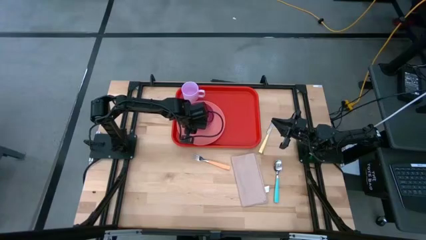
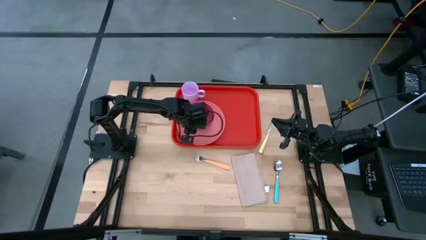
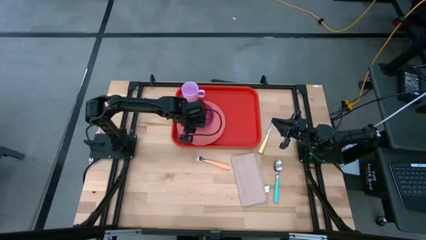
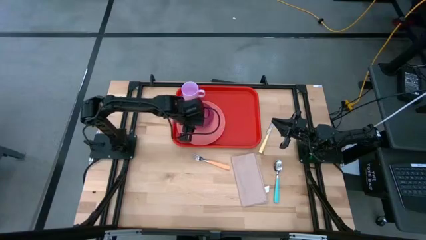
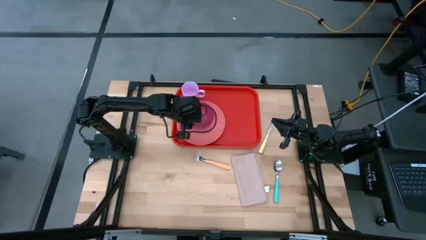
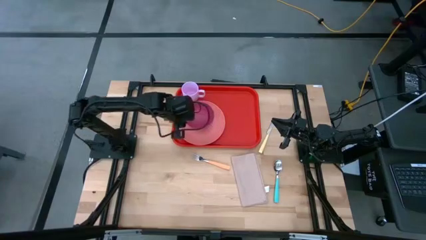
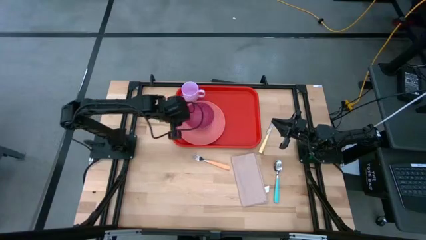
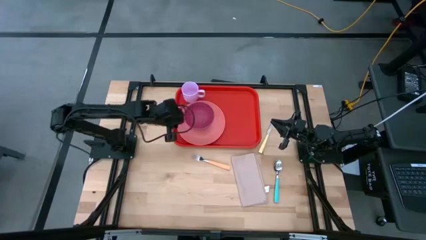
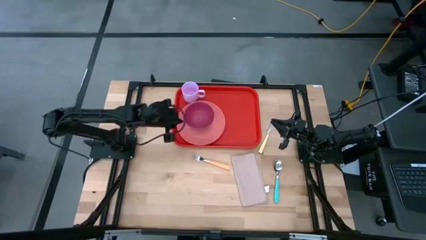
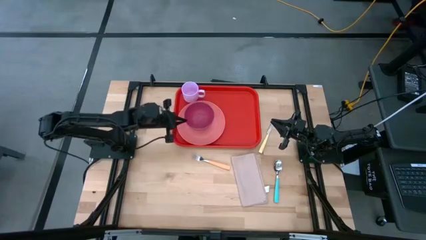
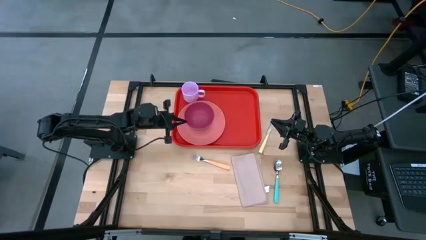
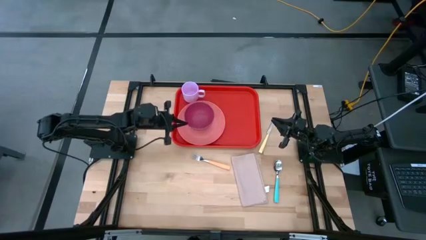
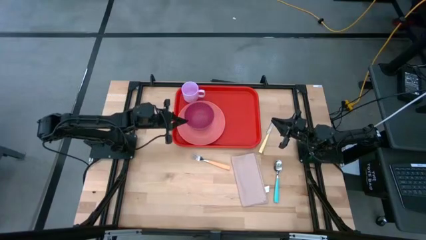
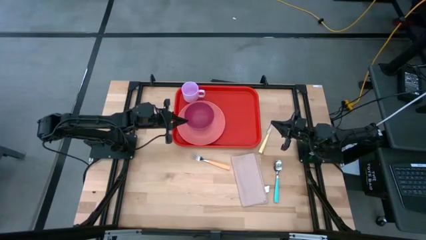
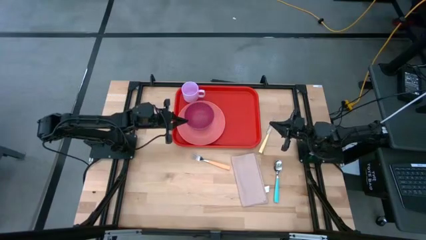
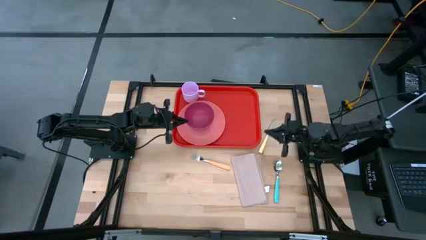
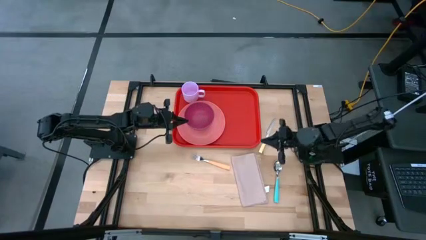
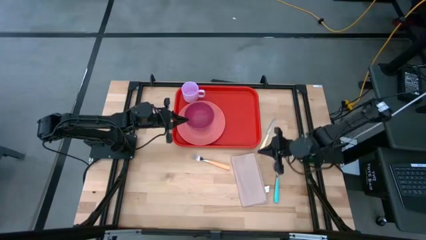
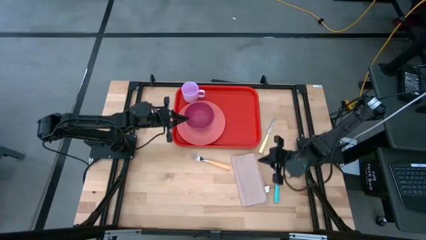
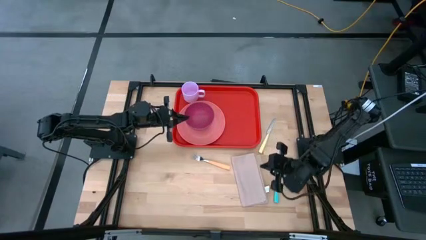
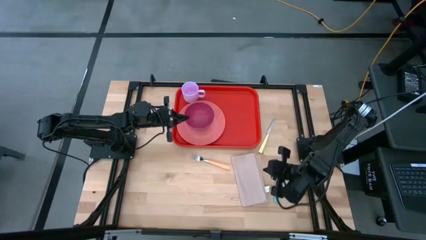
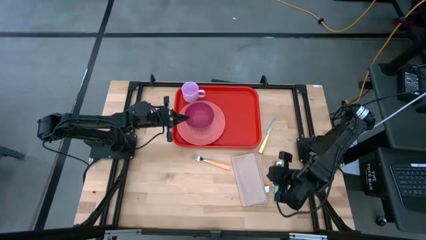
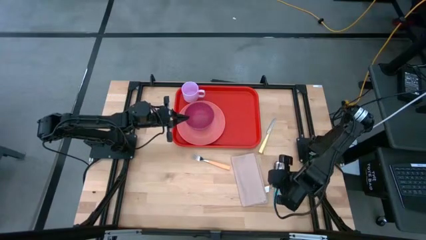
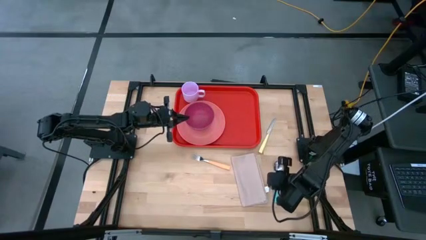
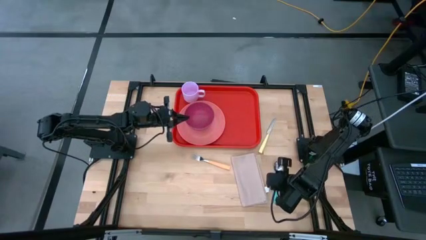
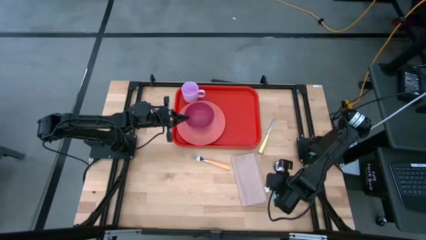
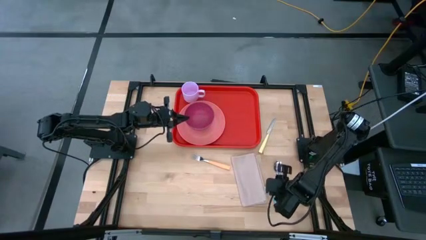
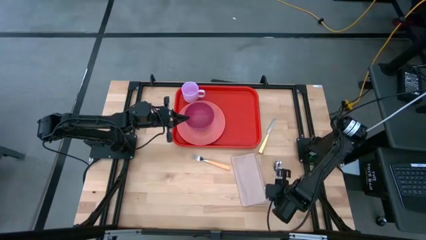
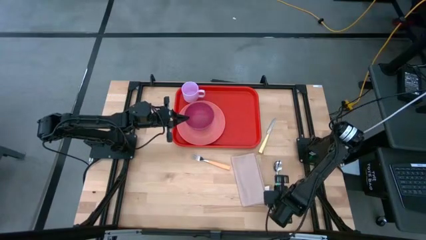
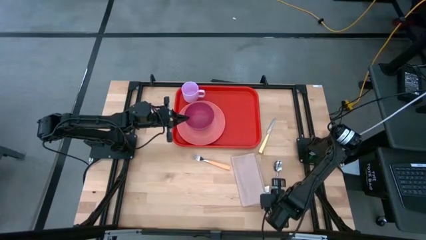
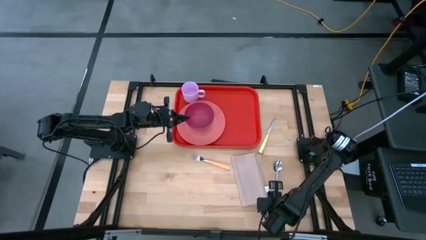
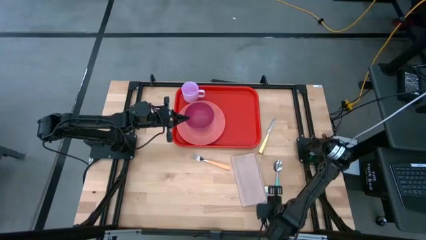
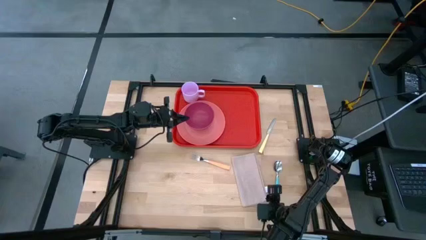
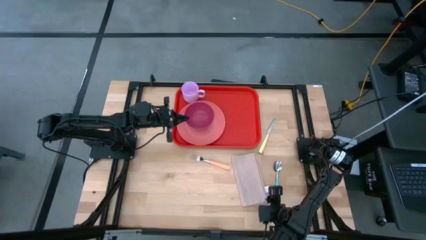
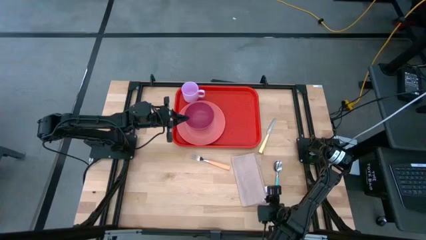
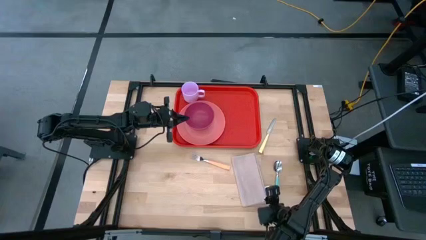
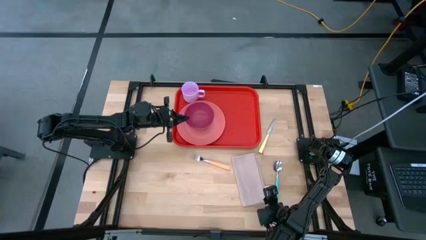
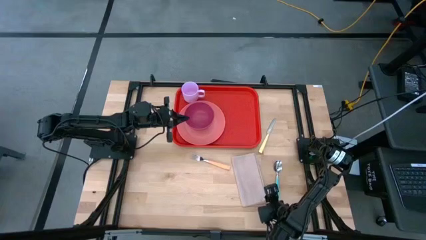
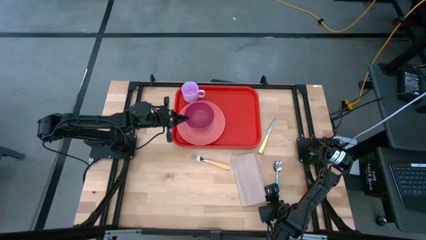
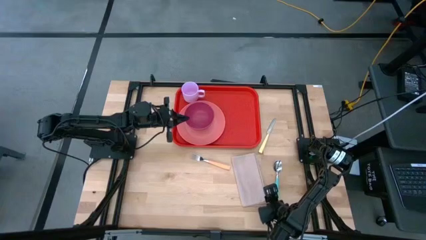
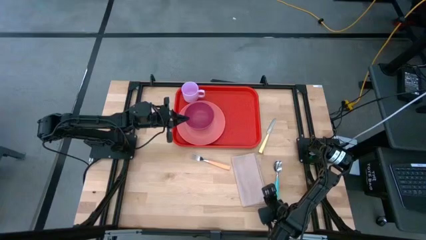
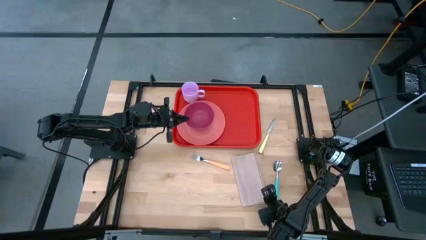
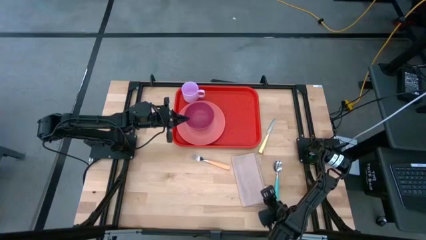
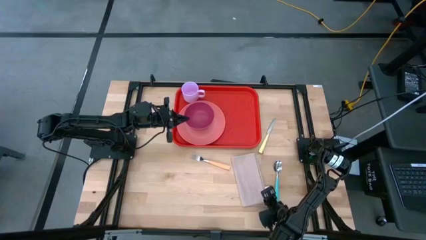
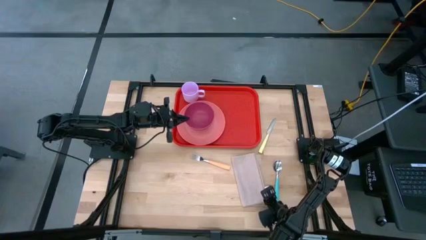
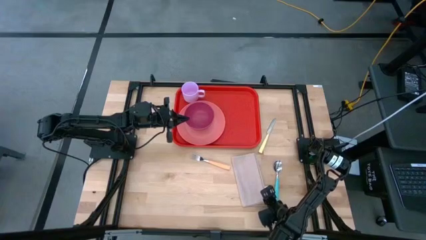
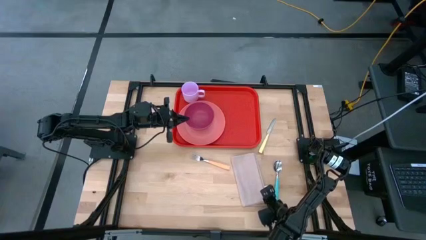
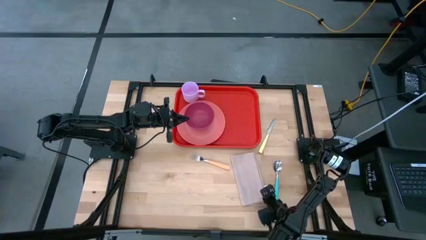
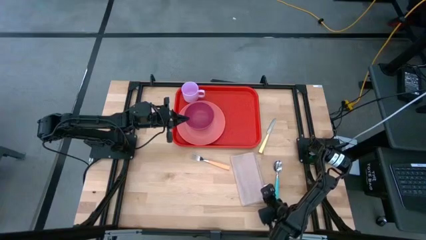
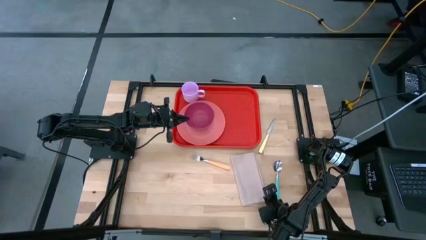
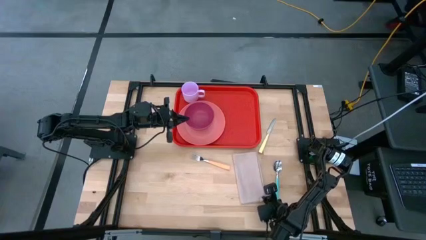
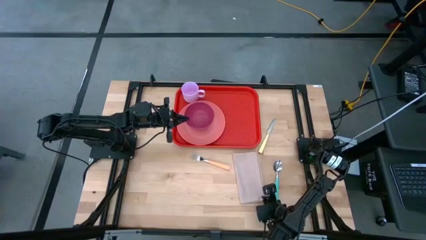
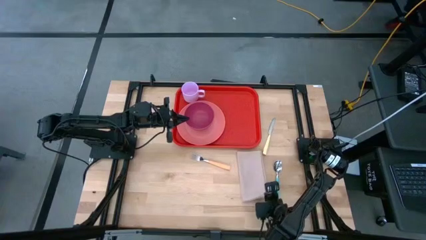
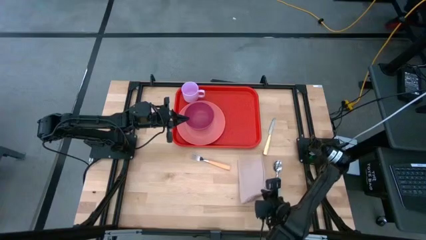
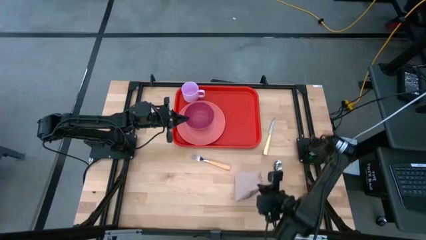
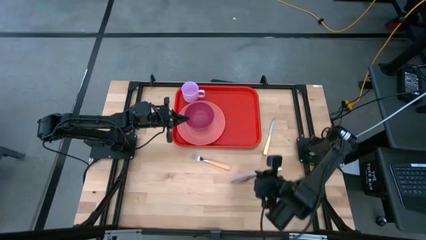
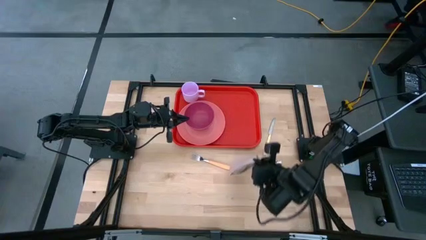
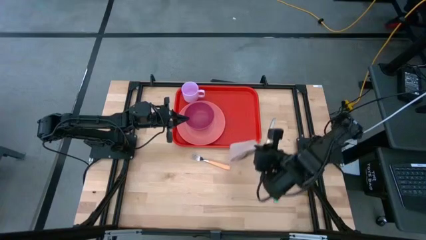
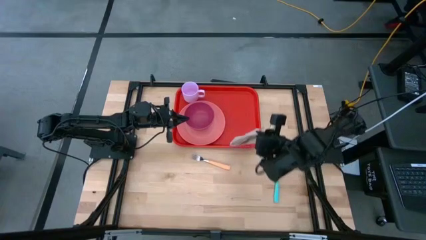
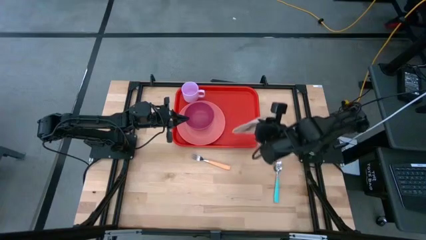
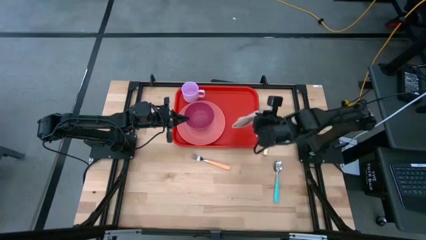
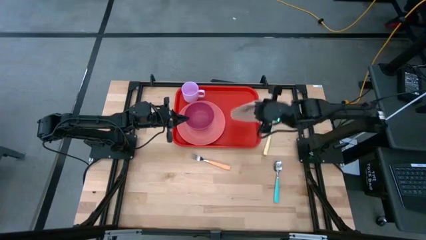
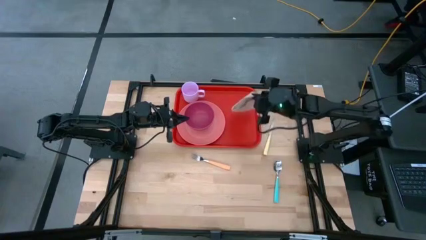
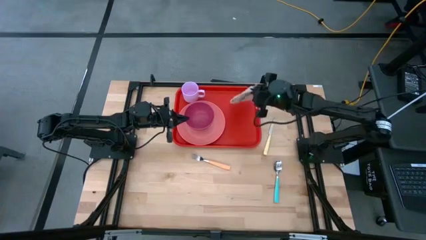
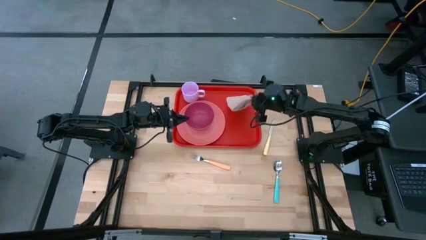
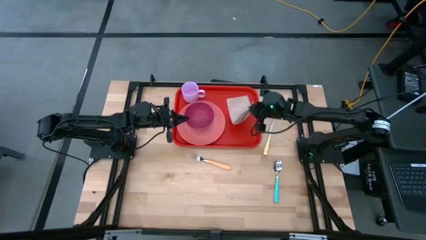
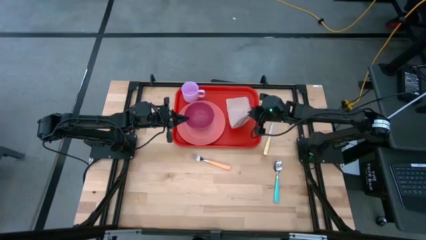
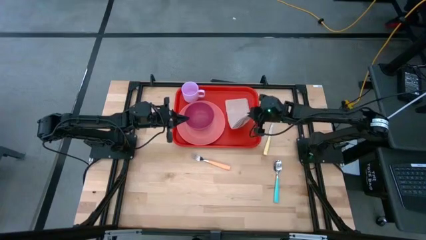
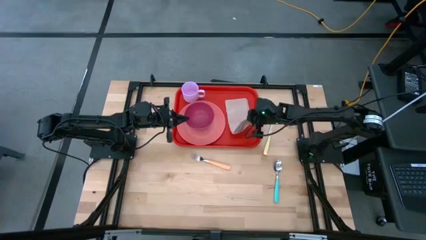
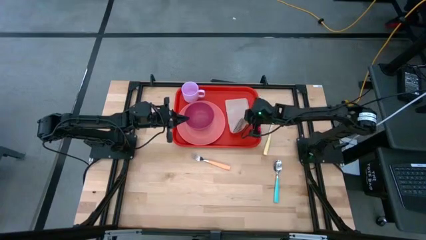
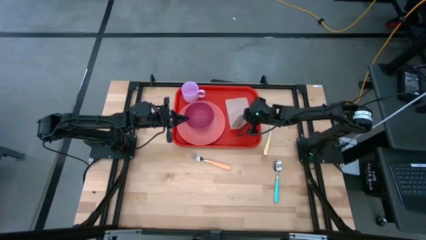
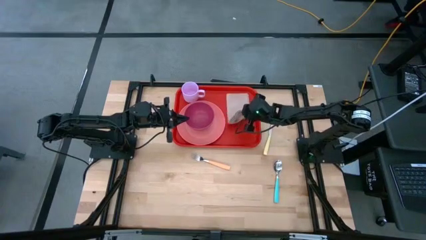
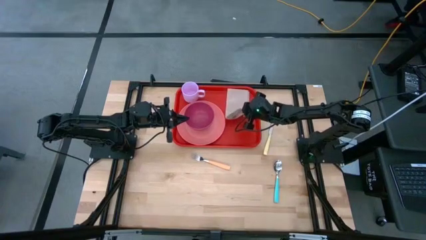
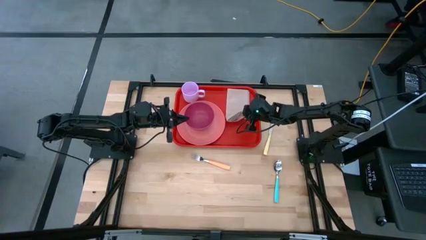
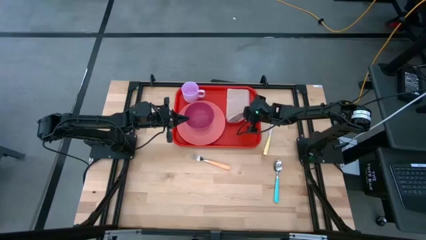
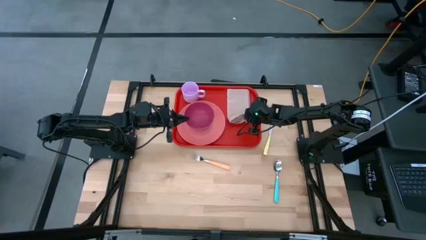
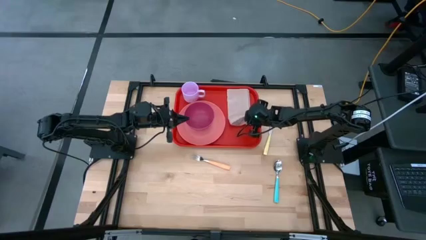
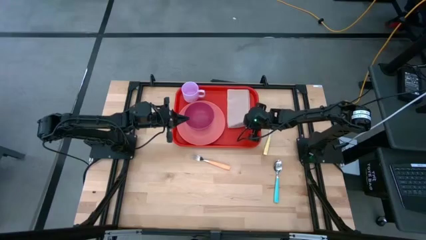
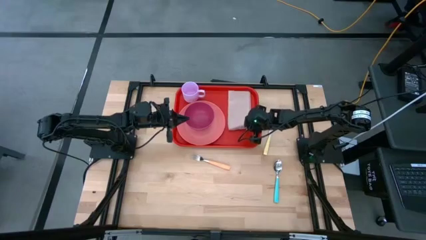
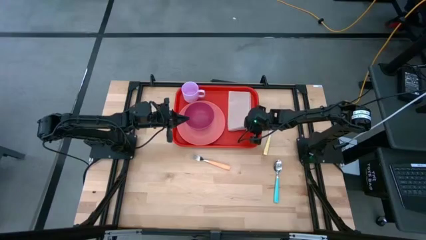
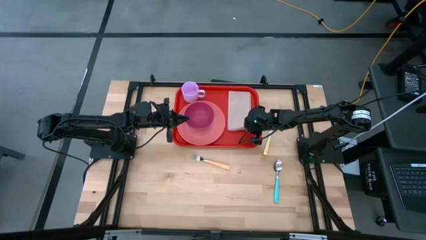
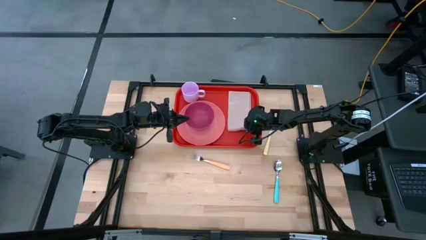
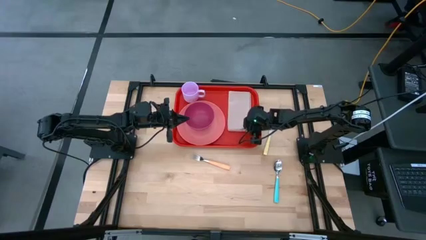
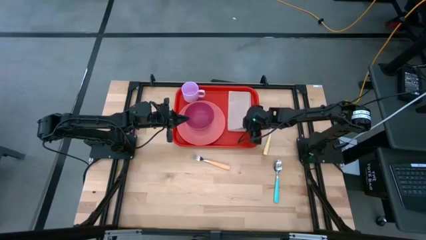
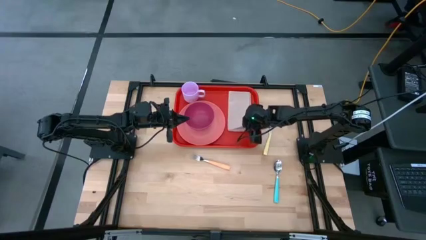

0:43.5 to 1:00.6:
Task: Set up tray
Put the brown napkin on the right of the pink plate on the red serving tray
